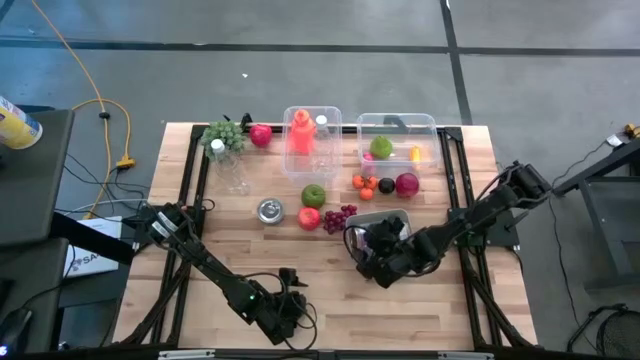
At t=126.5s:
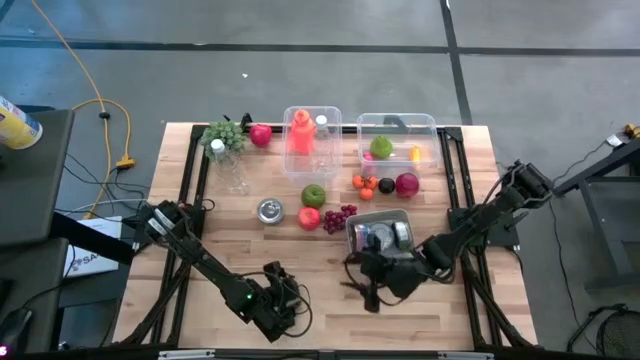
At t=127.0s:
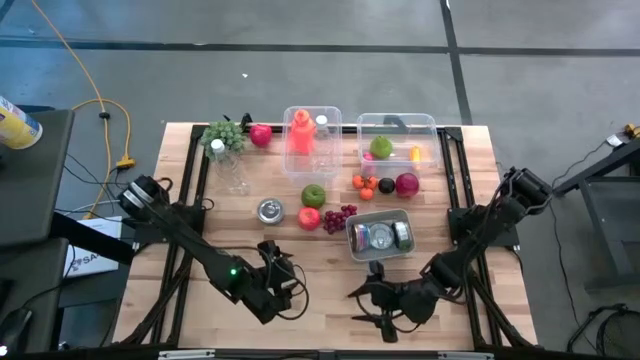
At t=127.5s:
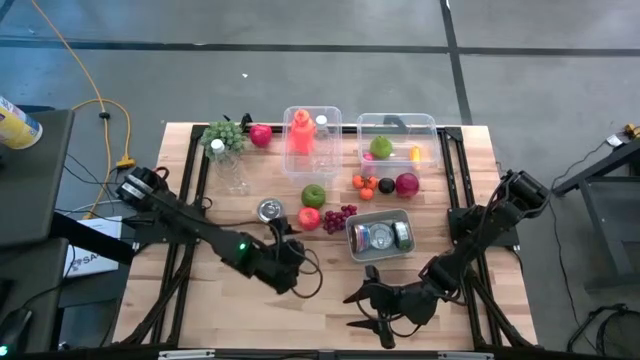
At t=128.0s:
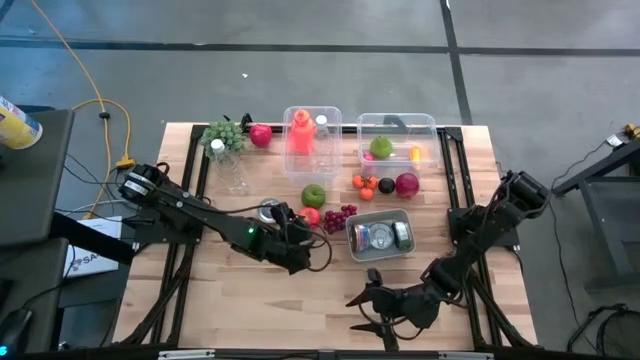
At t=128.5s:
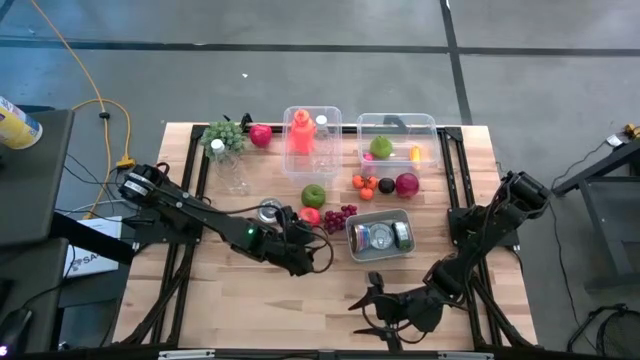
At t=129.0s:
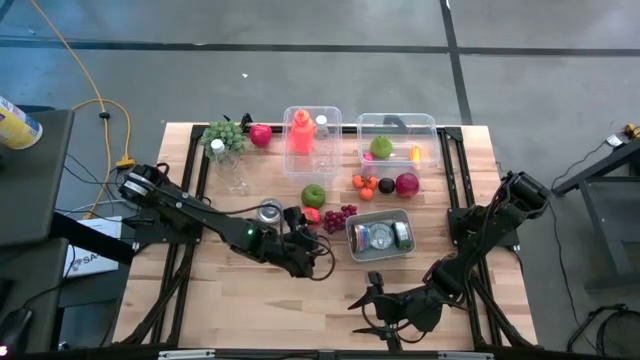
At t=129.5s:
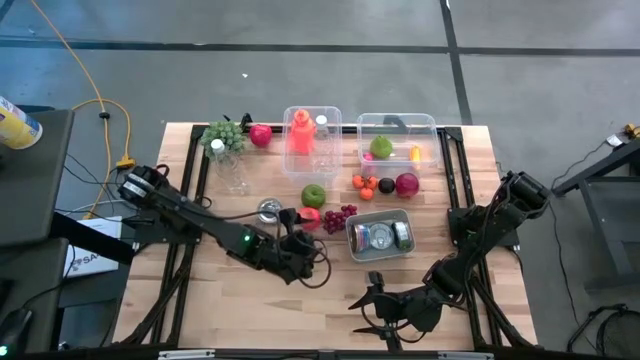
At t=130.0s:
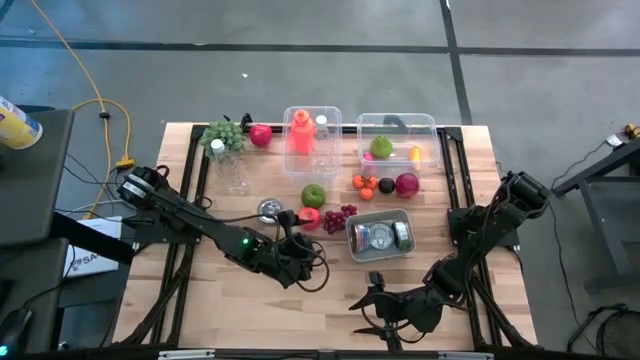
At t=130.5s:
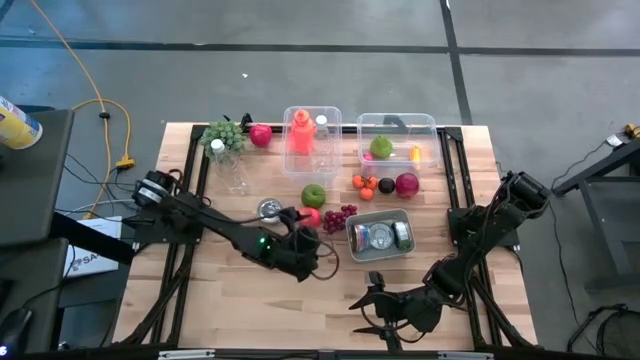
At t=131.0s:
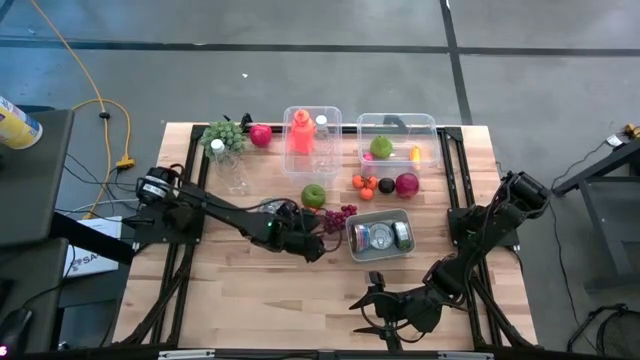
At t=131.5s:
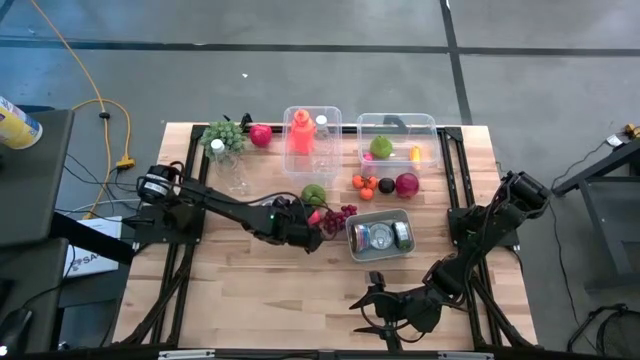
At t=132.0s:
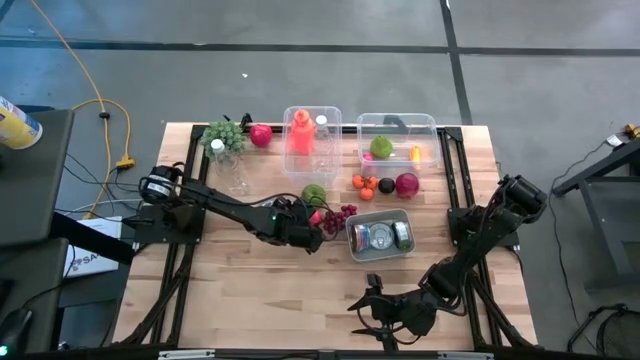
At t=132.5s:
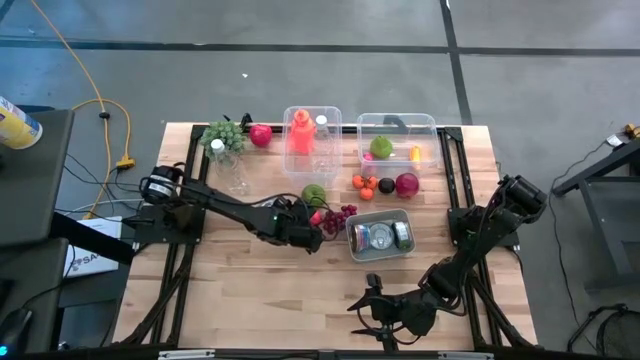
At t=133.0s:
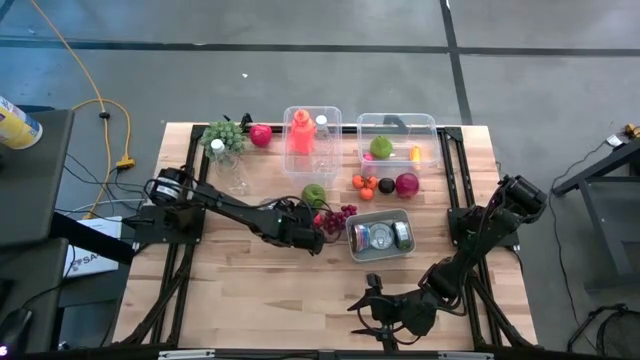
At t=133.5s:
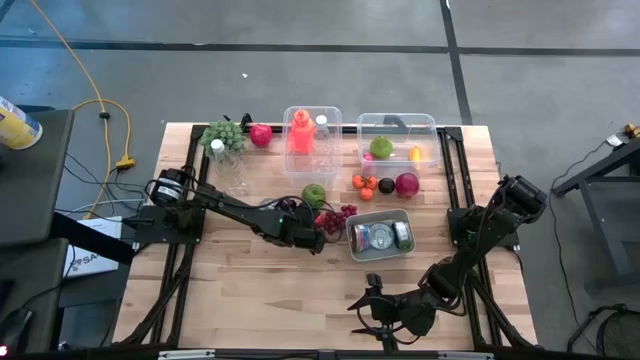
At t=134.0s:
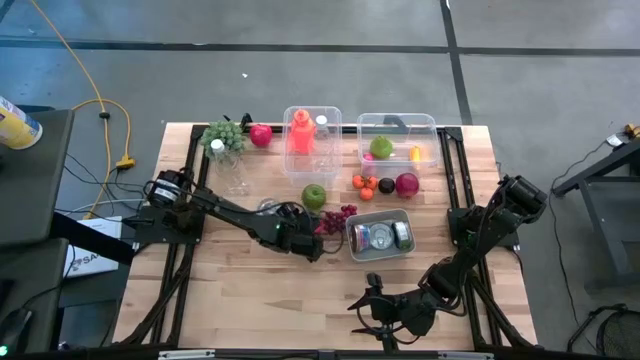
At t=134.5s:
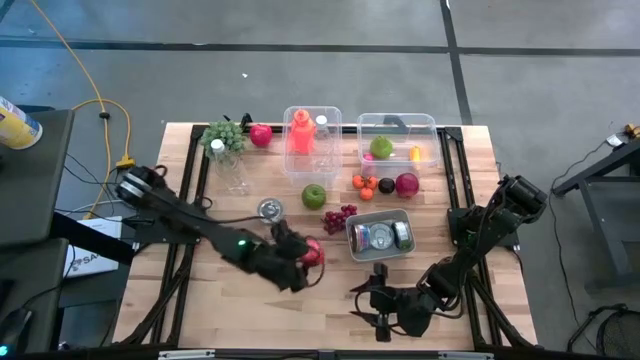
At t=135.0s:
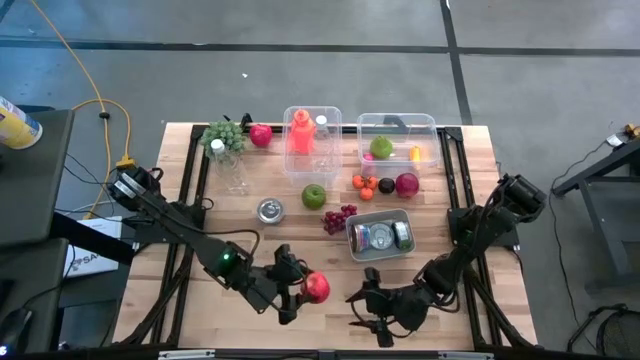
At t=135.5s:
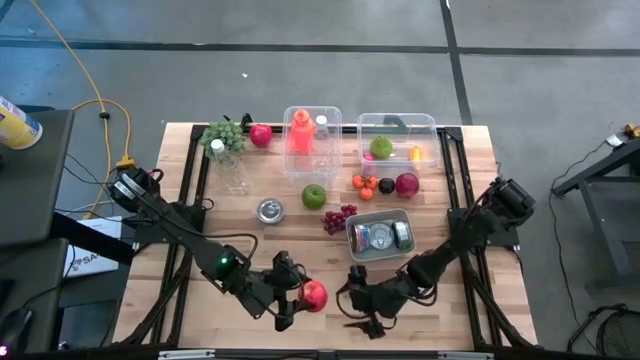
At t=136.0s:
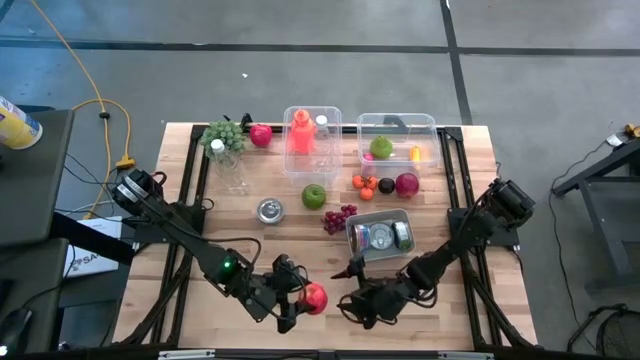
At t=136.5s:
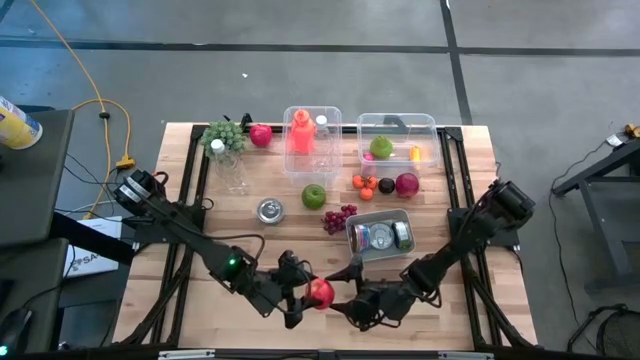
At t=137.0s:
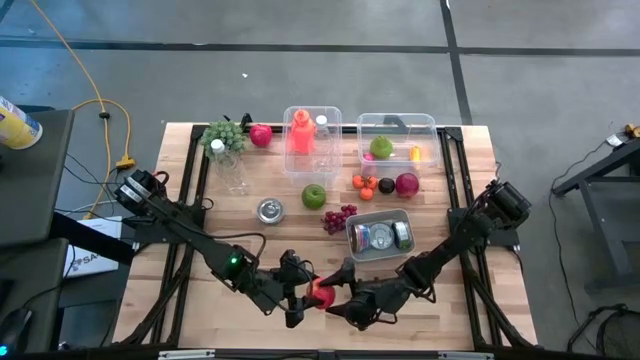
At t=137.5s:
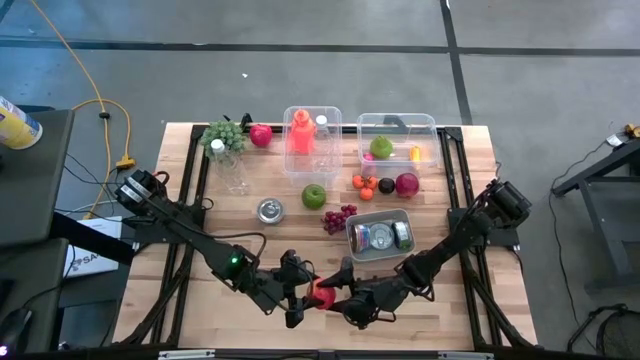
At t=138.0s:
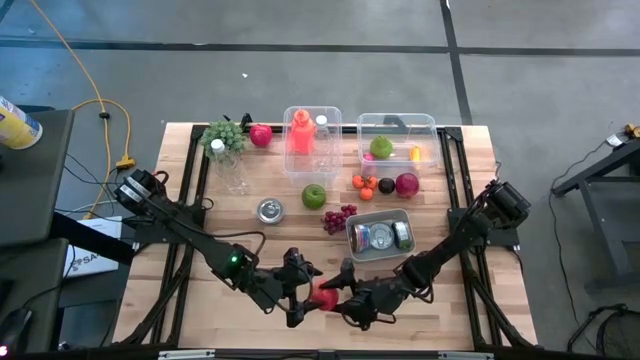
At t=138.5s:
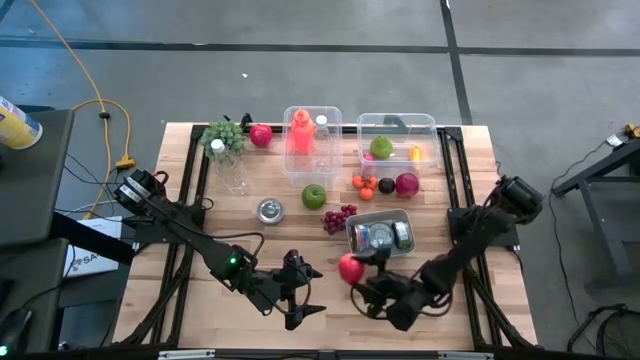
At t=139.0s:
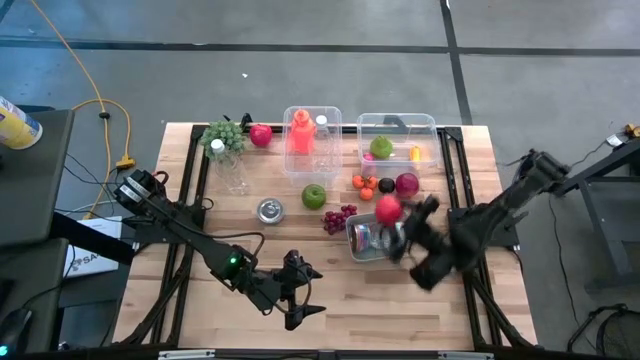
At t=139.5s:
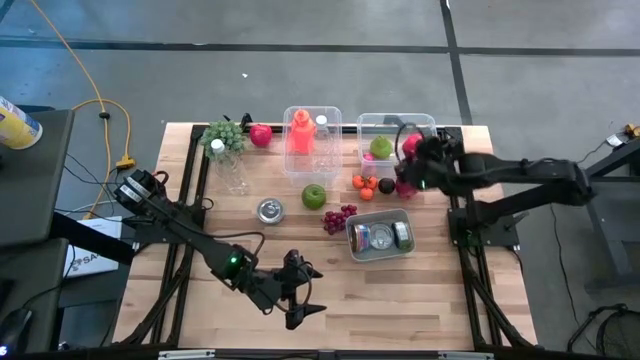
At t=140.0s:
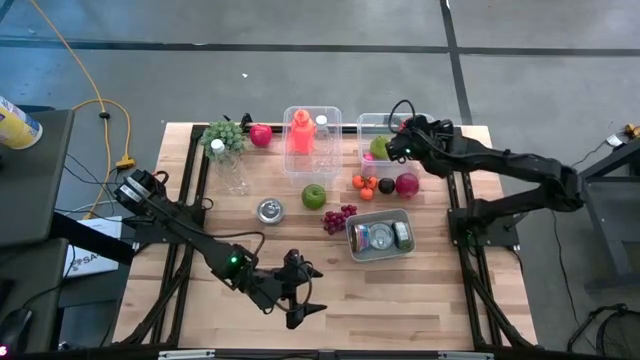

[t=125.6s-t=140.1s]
Task: Pick & Place Food Item
Put the bottom red apple into the right transparent bin

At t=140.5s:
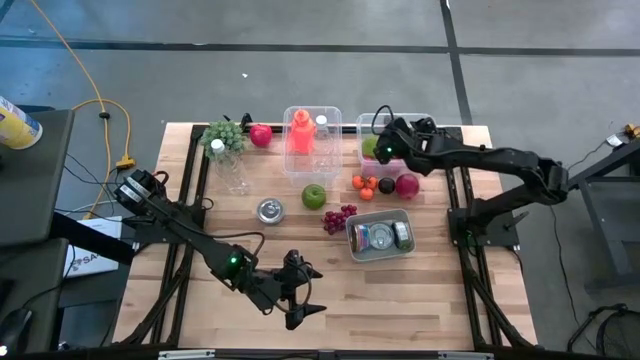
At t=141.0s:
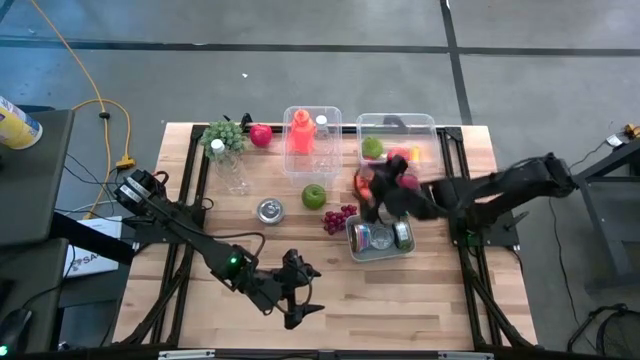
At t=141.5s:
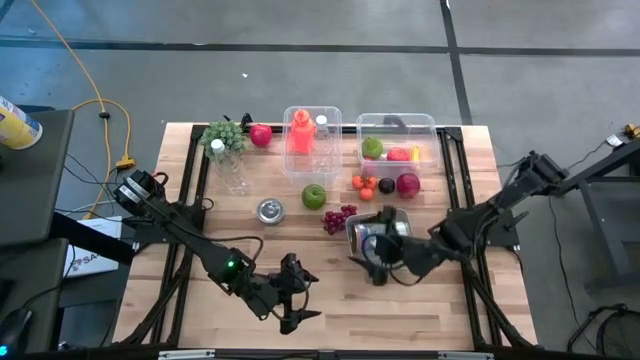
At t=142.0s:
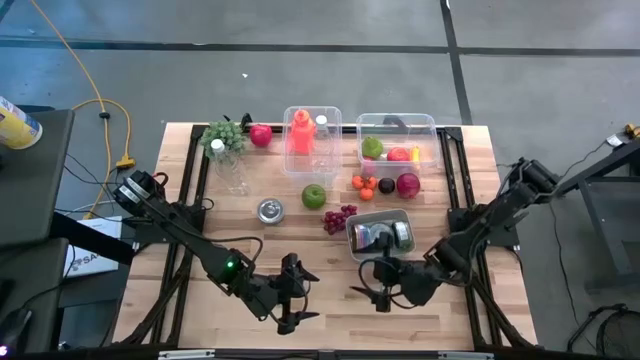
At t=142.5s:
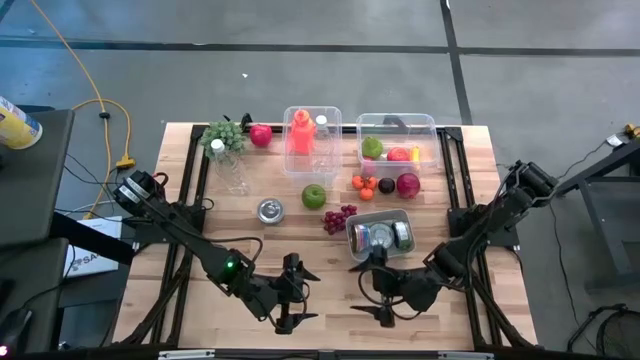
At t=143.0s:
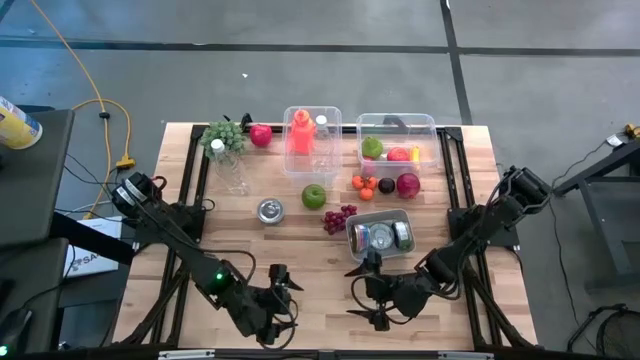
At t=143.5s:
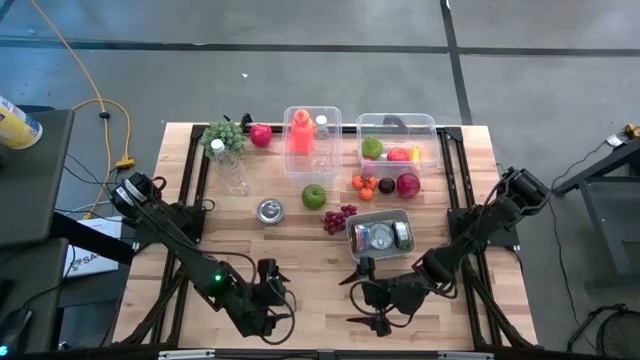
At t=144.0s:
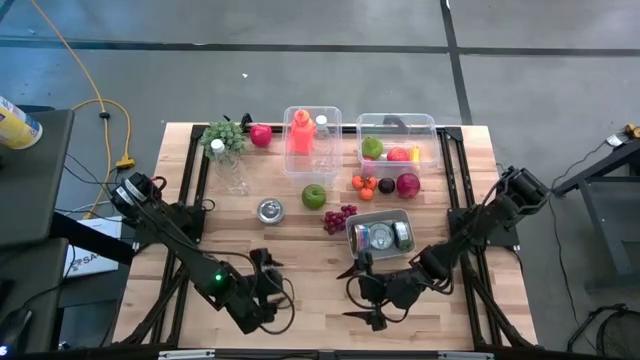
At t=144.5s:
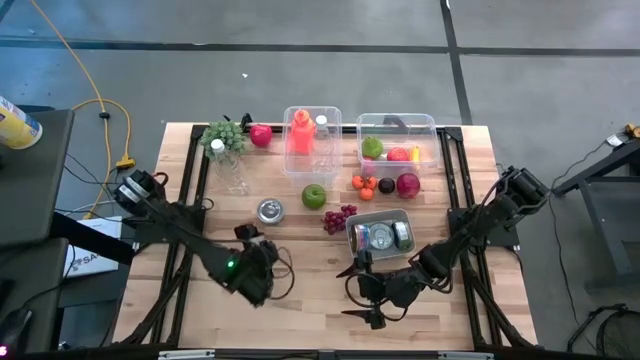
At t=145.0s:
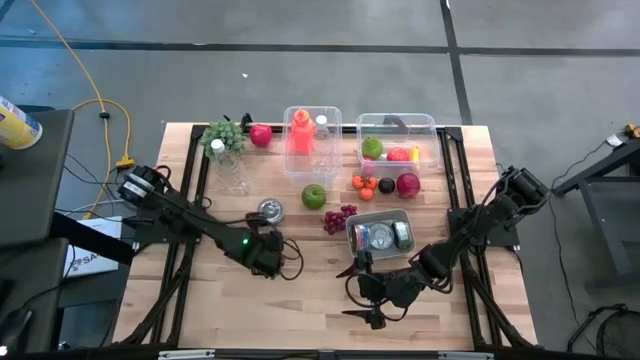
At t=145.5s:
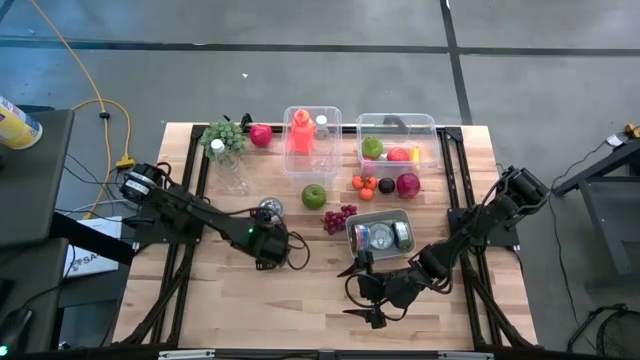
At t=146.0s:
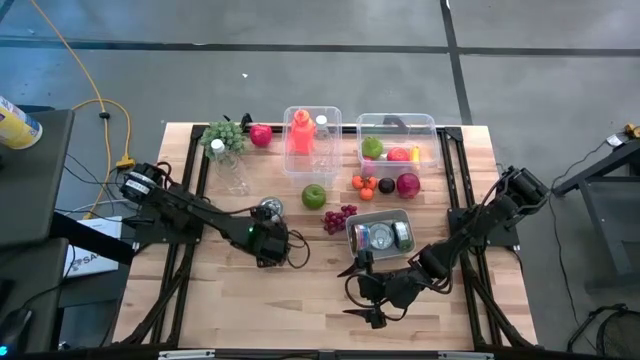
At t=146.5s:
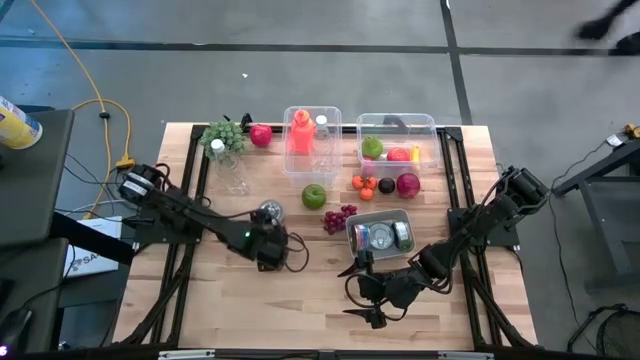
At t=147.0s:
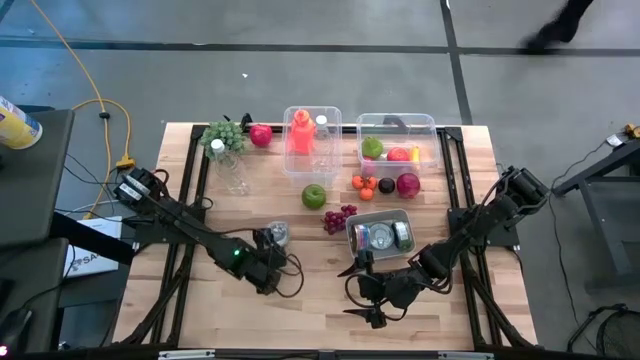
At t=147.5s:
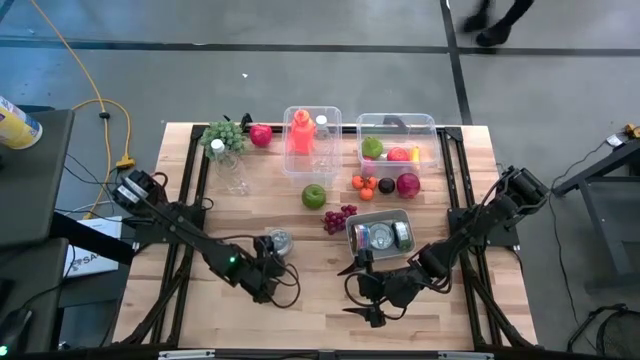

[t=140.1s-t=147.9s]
Put the green tuna can into the gray bin
